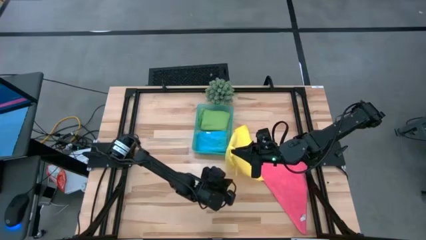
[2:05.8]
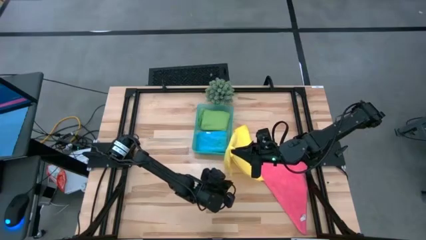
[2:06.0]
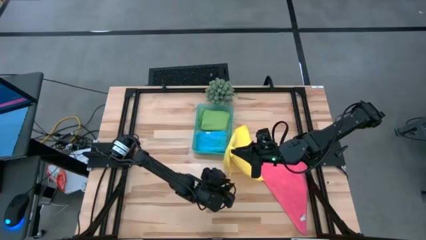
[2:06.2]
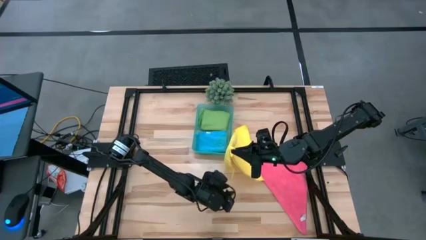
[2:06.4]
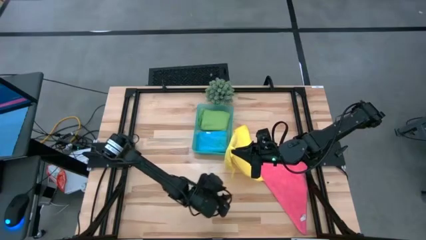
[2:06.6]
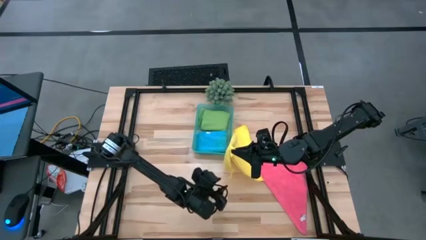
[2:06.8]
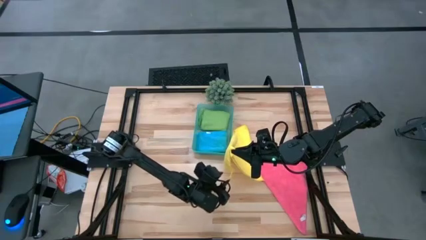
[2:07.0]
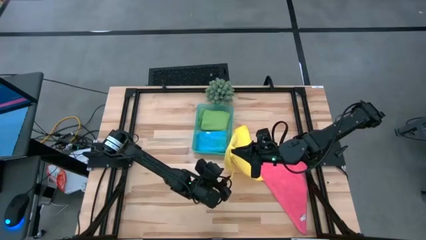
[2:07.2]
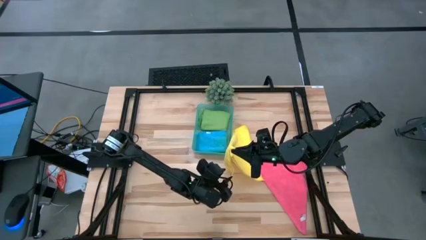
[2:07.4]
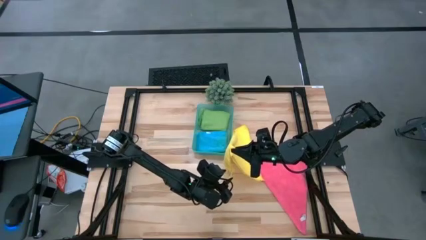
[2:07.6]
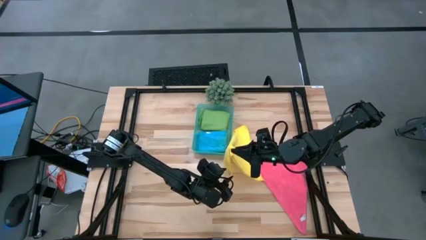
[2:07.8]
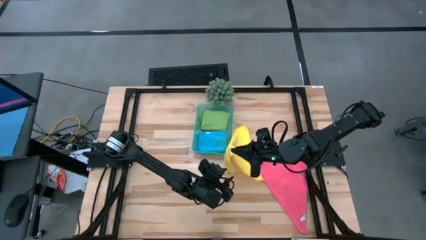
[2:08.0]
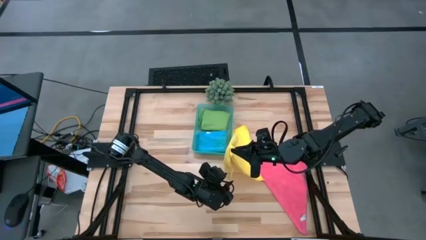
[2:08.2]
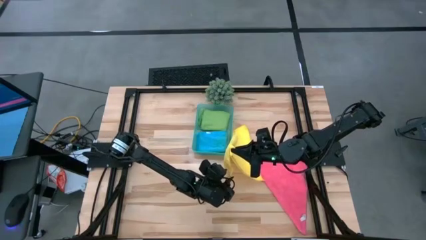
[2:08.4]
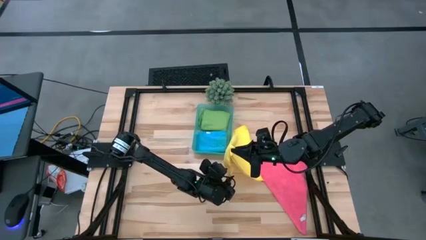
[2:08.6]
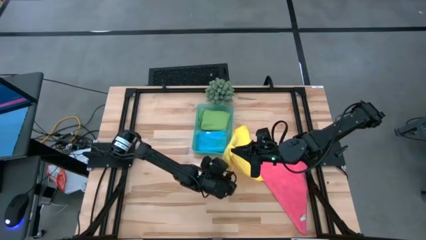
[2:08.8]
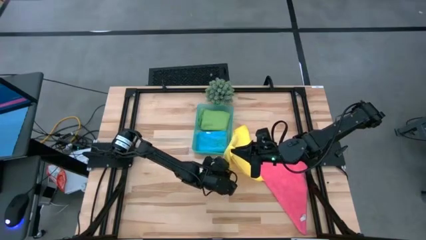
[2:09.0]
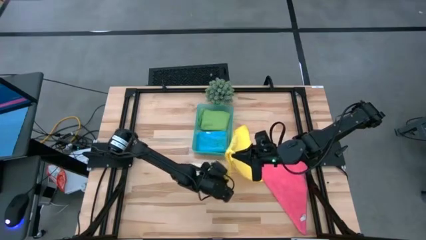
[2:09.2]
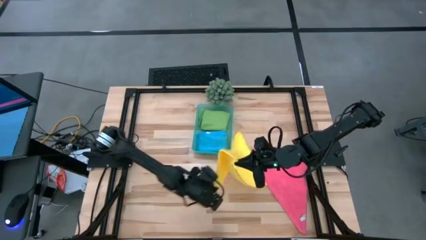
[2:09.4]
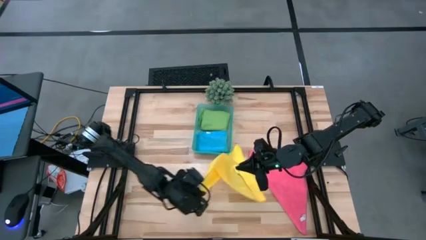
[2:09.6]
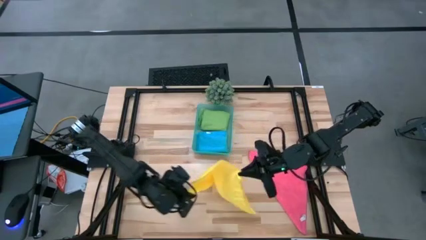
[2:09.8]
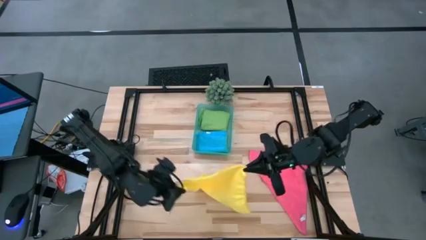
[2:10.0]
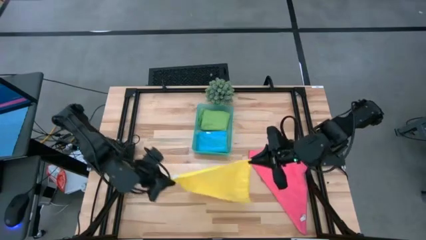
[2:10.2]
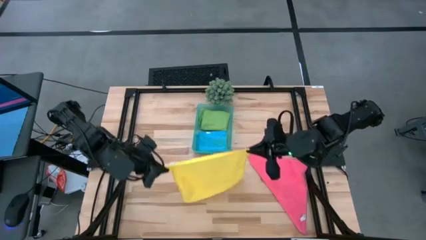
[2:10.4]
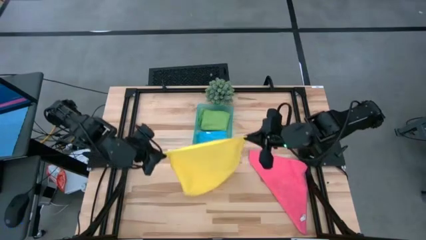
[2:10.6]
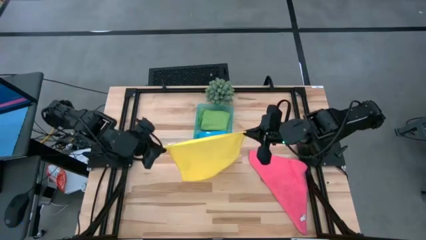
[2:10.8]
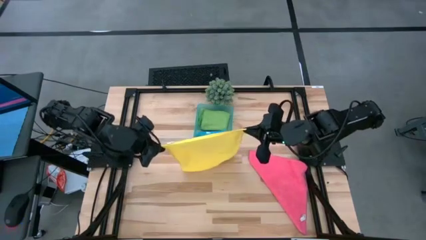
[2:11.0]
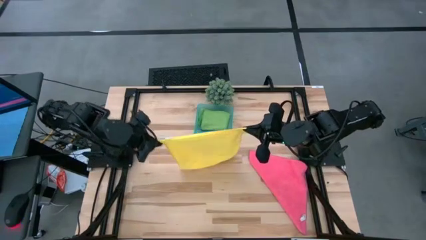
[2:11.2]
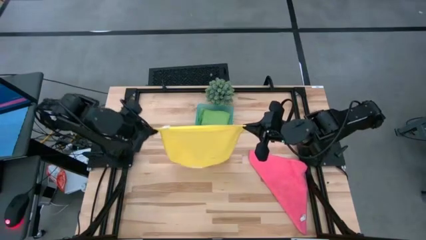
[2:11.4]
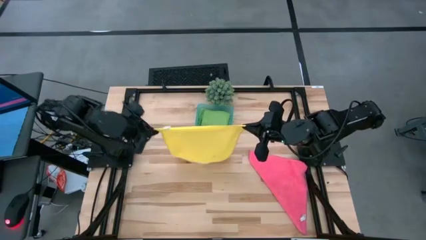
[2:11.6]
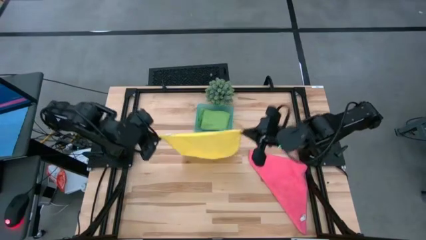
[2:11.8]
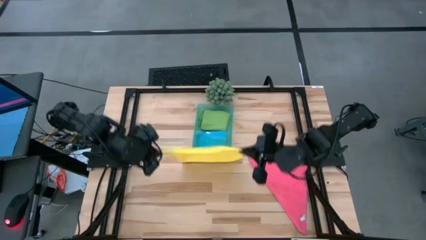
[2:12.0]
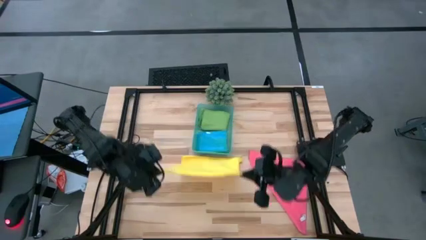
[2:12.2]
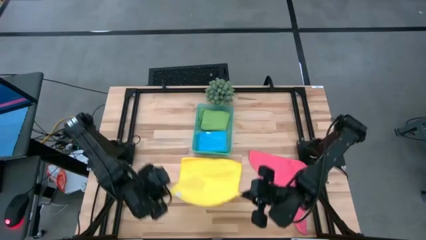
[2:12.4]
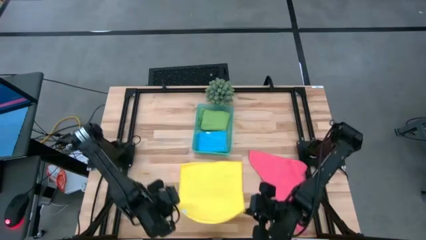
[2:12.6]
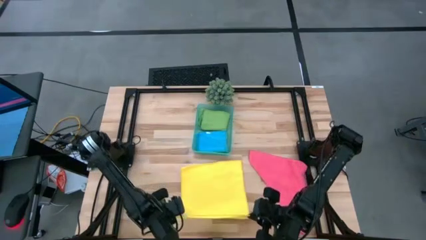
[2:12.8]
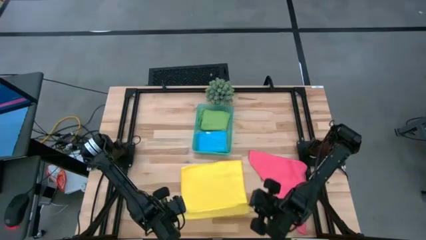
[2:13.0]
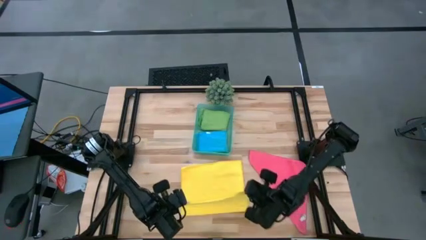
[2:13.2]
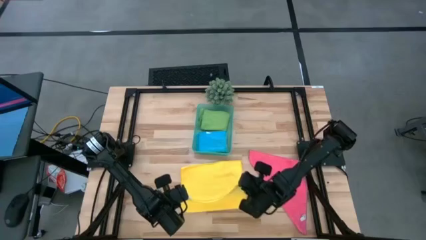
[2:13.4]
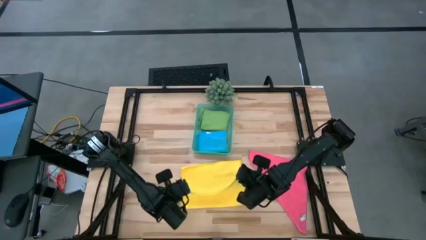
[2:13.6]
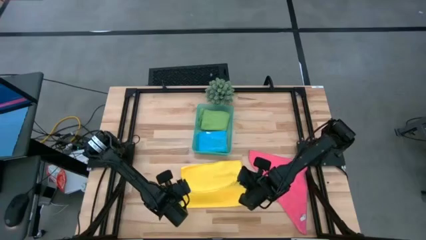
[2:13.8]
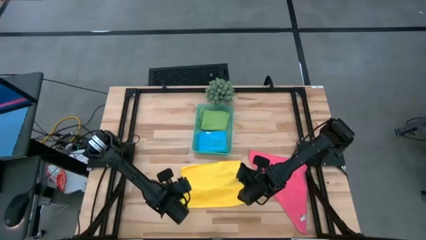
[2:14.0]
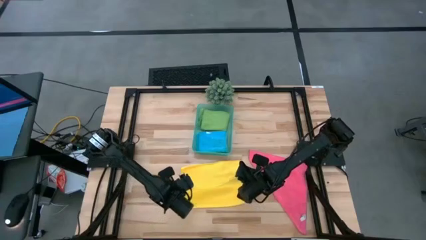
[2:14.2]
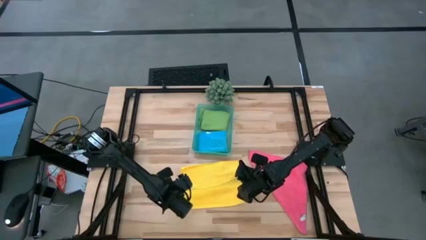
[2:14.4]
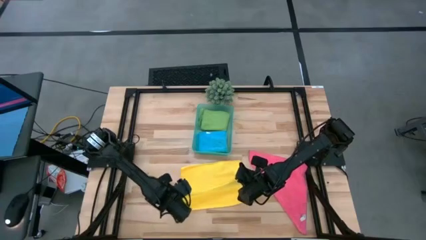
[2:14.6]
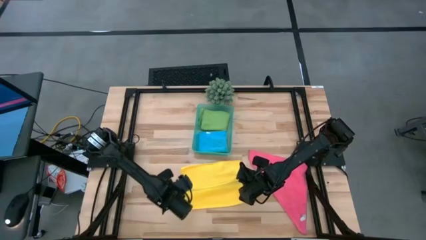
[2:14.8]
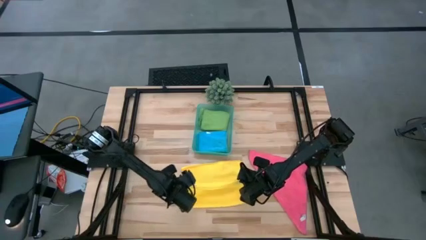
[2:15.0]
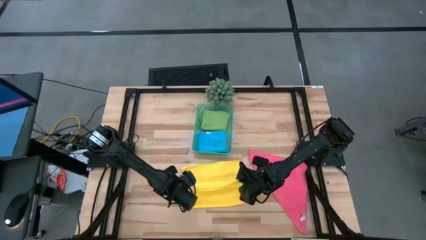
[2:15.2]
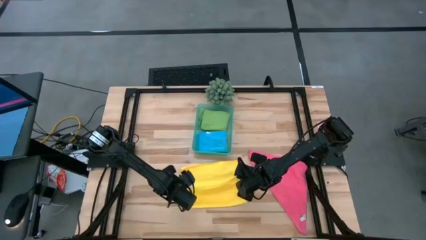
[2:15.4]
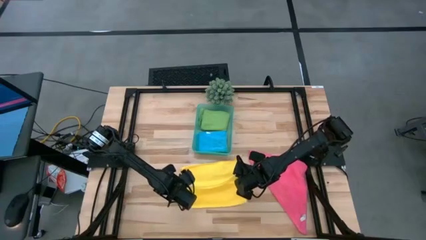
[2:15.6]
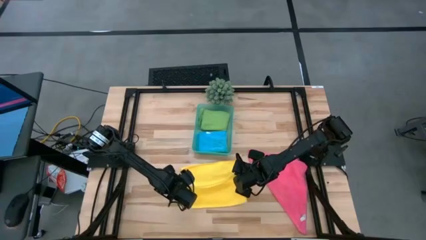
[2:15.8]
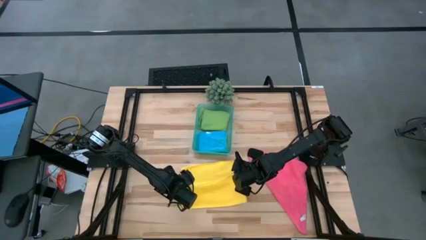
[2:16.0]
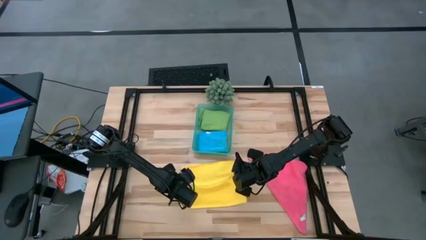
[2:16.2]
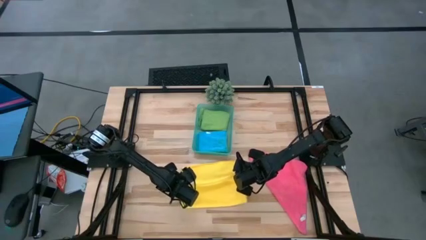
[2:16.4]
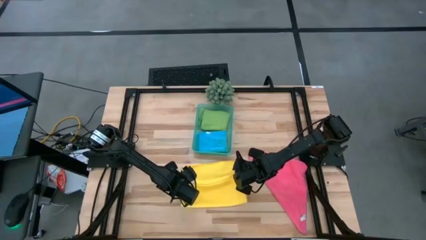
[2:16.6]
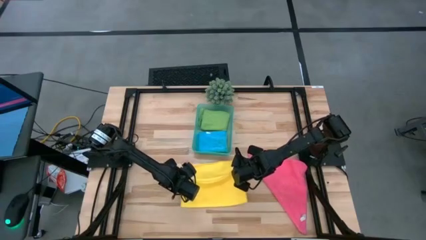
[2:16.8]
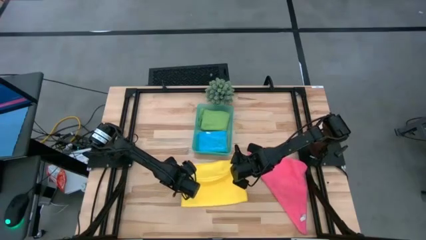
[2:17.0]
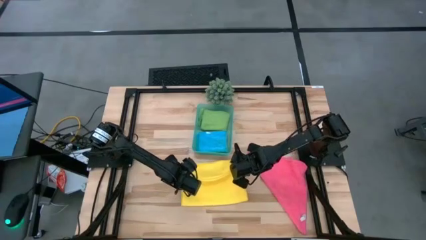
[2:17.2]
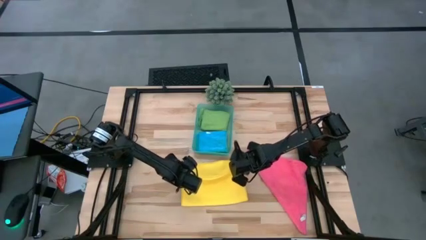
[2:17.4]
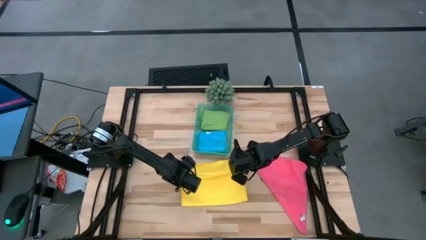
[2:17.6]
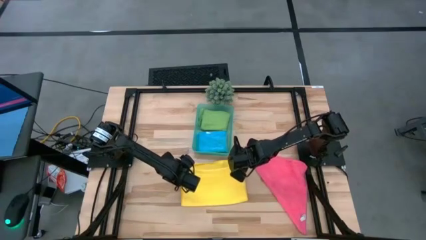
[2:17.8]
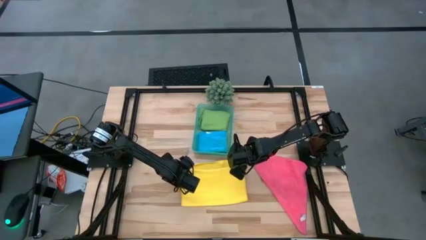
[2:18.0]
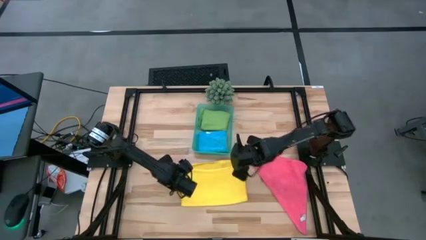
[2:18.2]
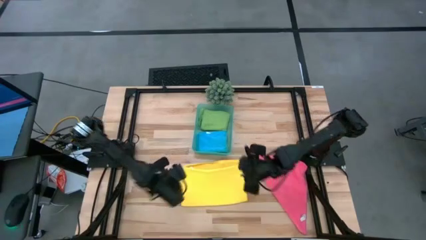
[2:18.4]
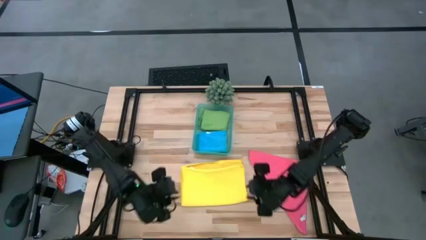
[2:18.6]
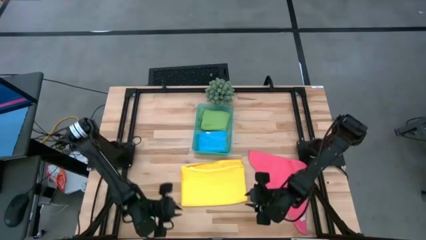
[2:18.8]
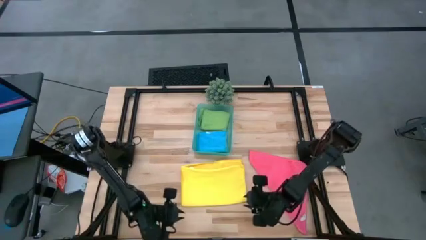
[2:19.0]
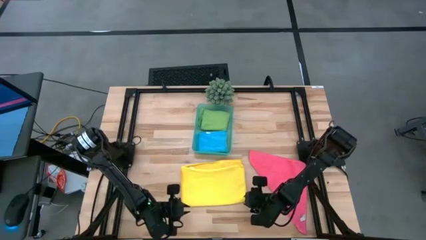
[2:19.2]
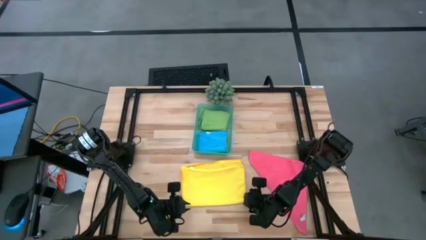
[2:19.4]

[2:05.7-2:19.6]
Task: Fold microfiber towels
Fold the yellow micro fiber cloth

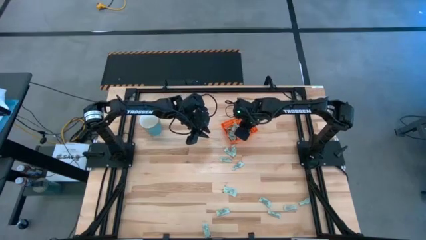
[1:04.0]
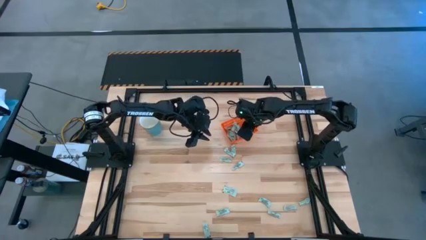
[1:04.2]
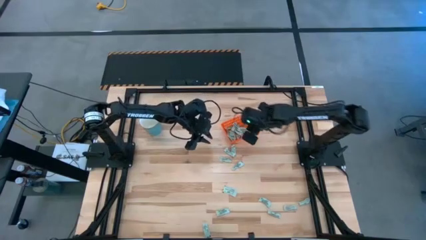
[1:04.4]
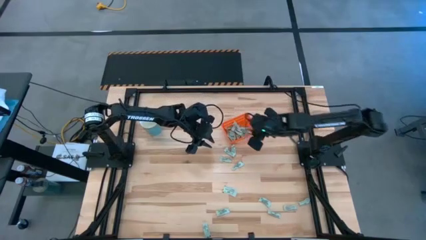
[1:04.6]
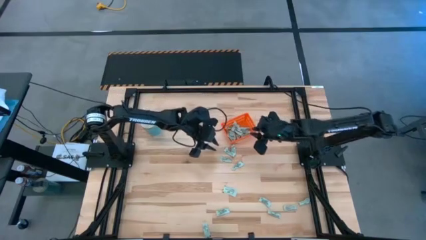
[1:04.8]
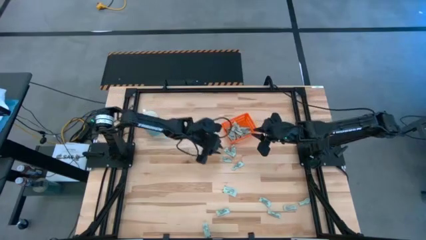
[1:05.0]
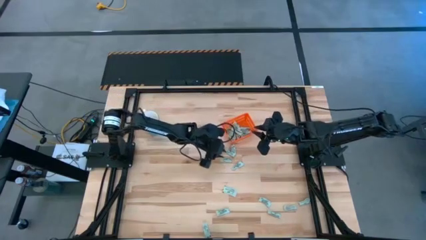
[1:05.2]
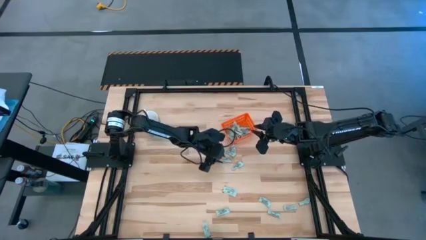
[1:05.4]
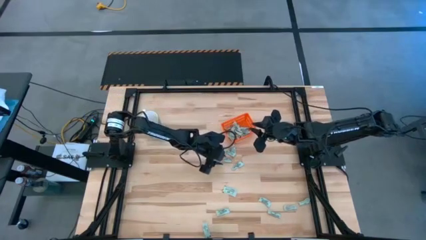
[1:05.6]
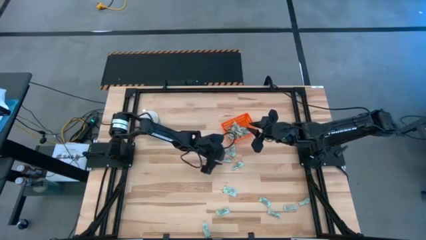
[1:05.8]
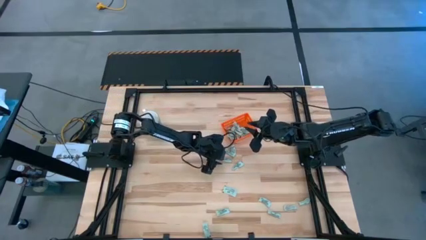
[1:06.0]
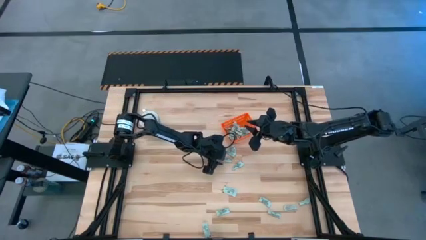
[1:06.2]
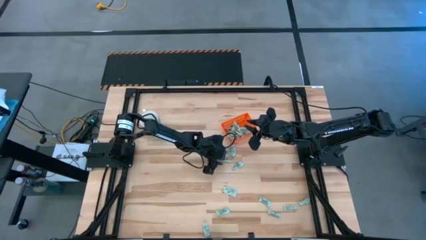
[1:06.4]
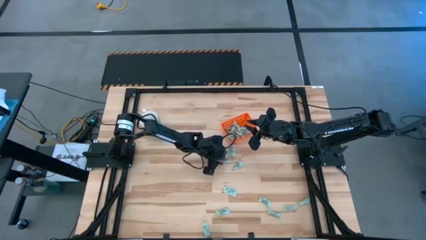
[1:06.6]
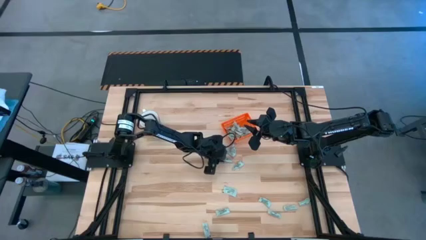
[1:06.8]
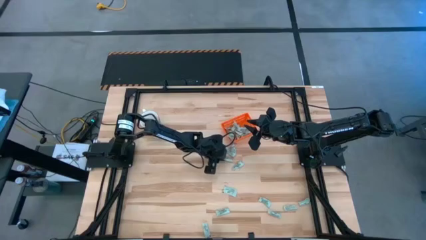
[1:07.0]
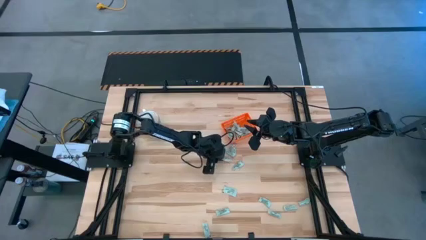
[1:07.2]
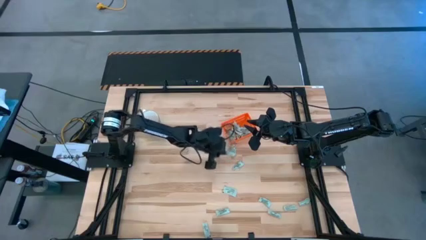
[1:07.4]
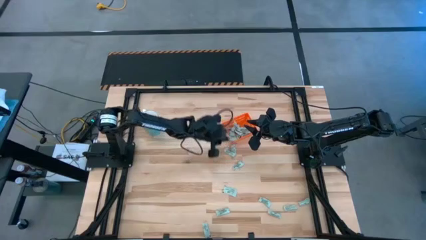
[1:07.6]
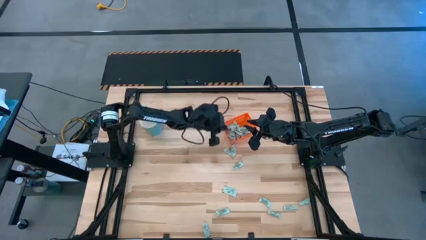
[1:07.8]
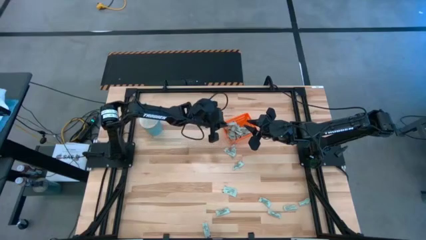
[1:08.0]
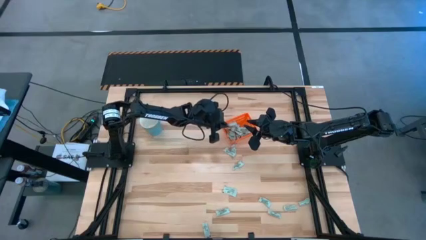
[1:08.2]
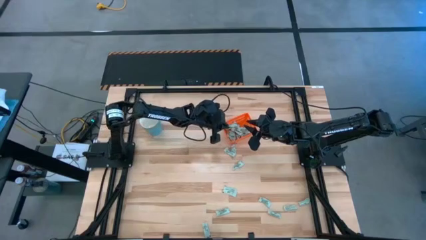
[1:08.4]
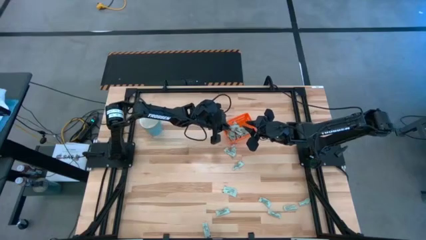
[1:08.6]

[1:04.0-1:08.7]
Task: Pick and place Stevia / Truvia into bins
Put the stevia packet into the orange bin
